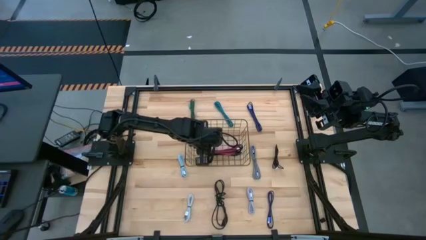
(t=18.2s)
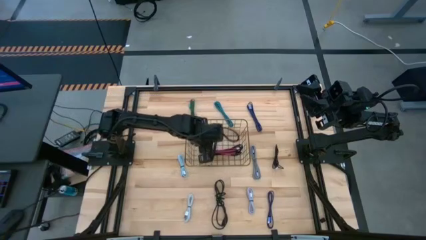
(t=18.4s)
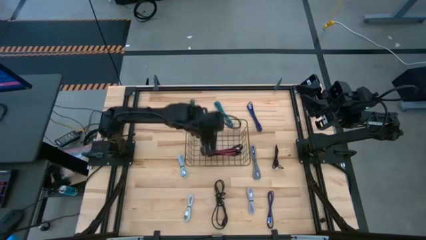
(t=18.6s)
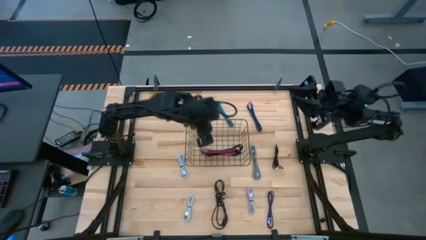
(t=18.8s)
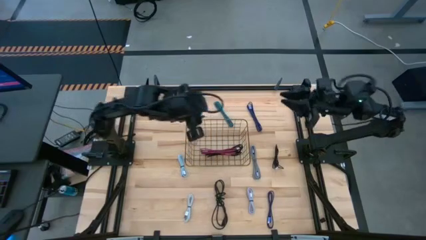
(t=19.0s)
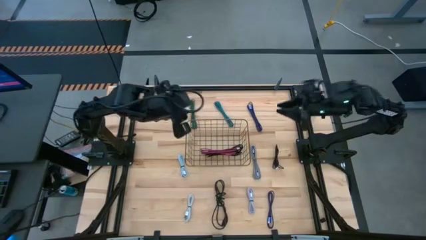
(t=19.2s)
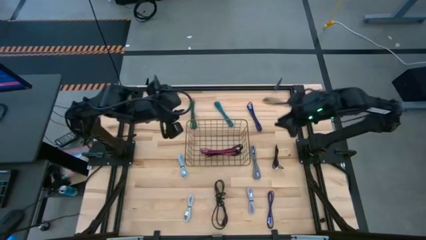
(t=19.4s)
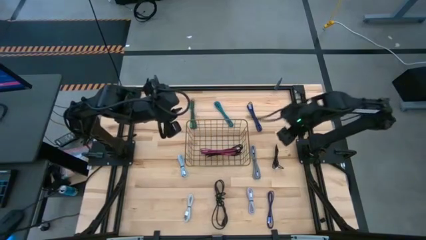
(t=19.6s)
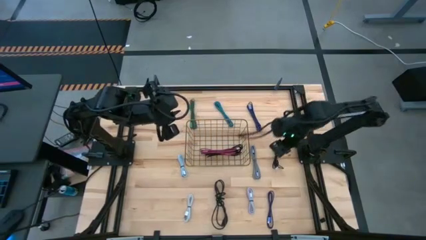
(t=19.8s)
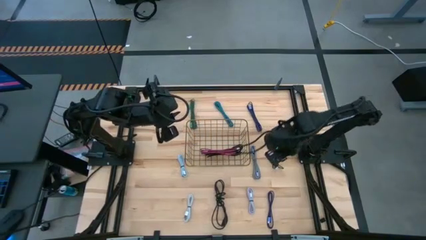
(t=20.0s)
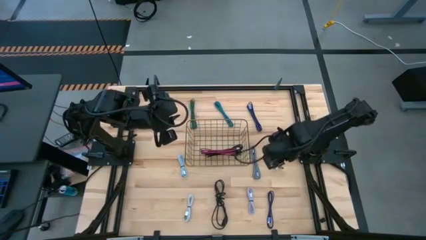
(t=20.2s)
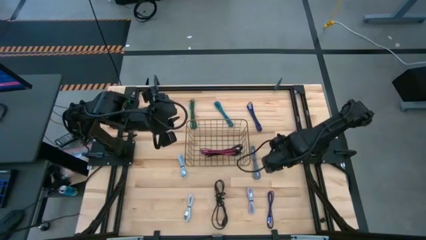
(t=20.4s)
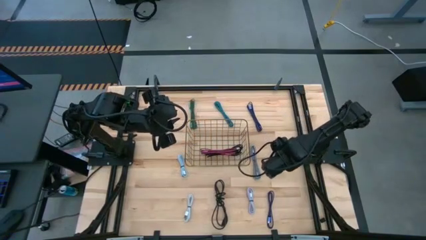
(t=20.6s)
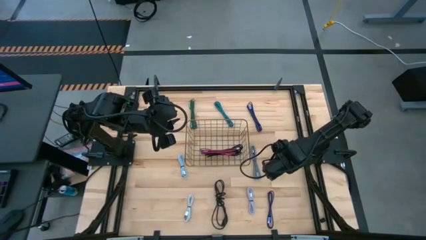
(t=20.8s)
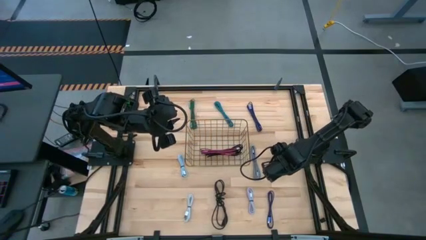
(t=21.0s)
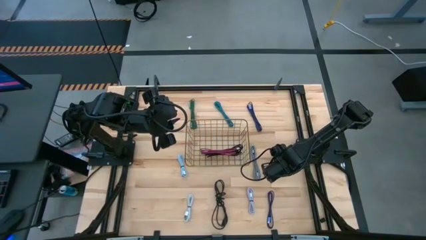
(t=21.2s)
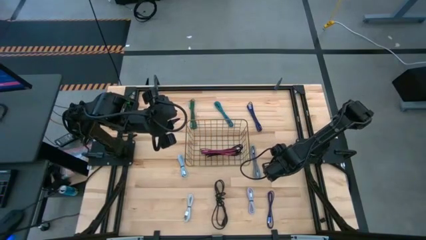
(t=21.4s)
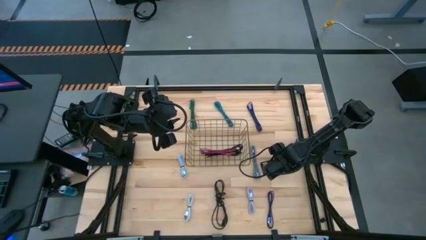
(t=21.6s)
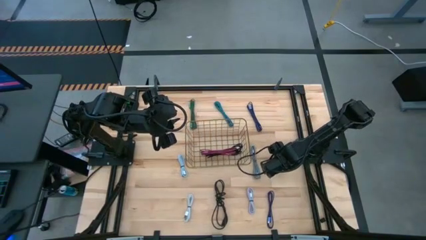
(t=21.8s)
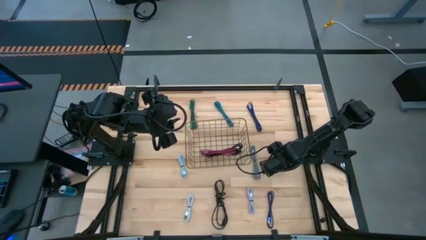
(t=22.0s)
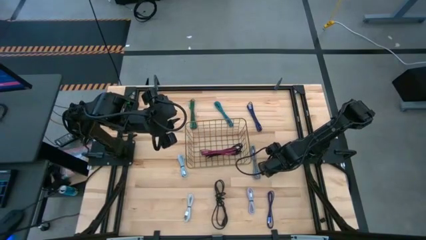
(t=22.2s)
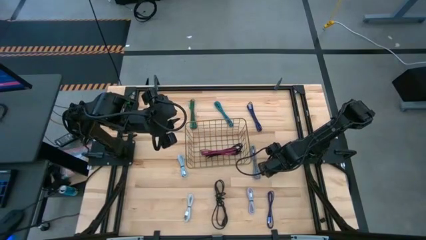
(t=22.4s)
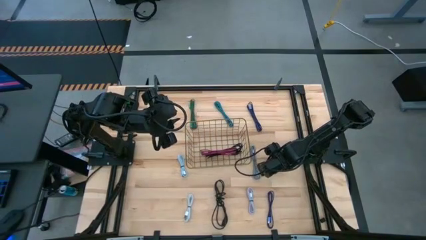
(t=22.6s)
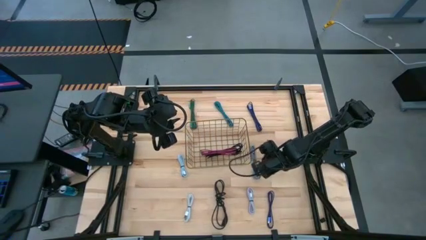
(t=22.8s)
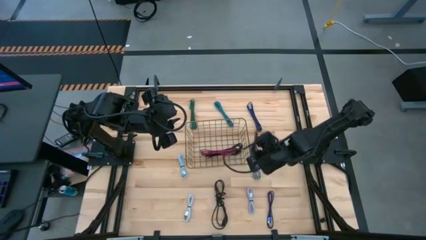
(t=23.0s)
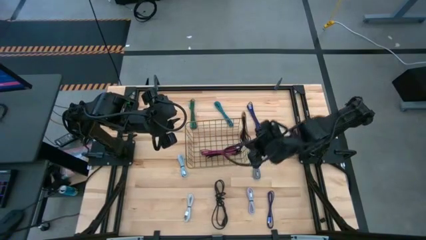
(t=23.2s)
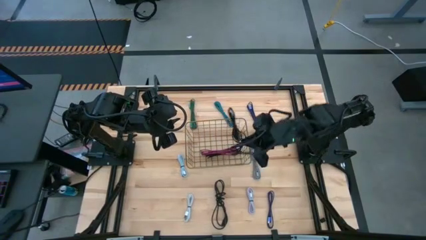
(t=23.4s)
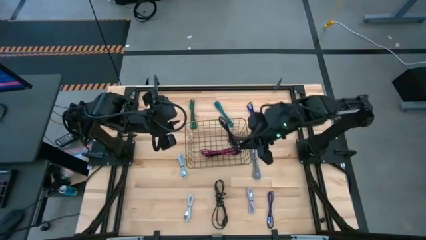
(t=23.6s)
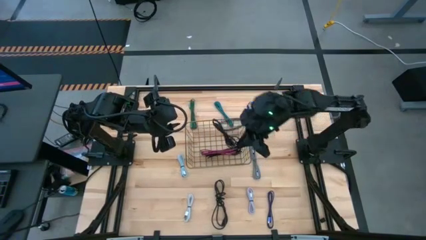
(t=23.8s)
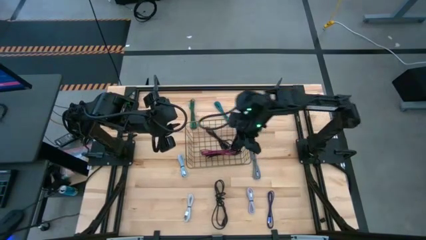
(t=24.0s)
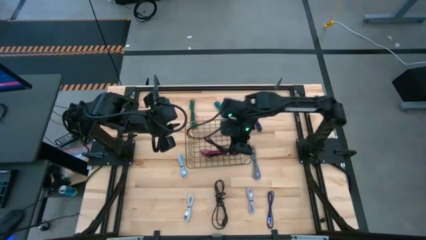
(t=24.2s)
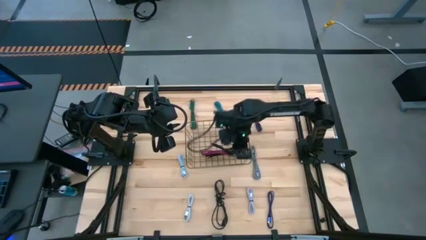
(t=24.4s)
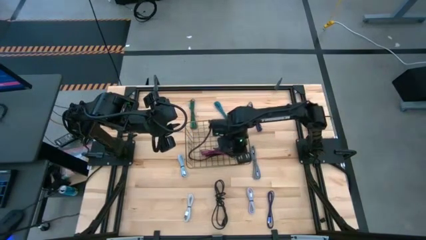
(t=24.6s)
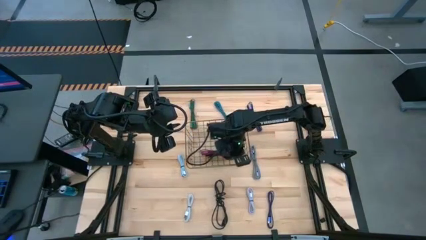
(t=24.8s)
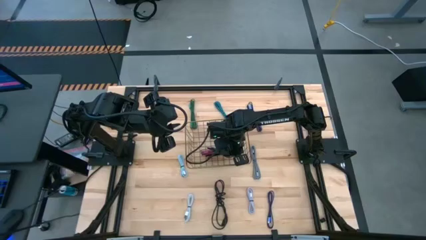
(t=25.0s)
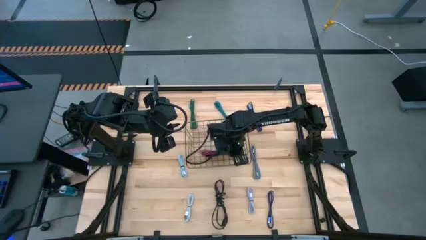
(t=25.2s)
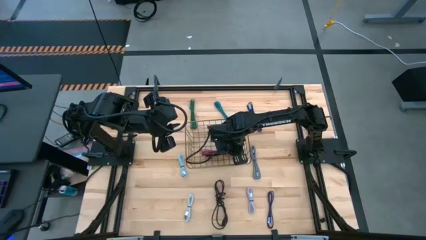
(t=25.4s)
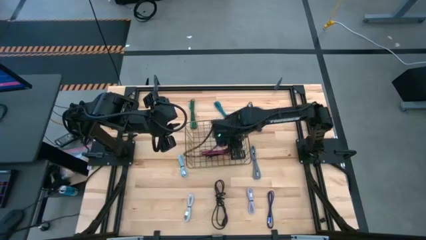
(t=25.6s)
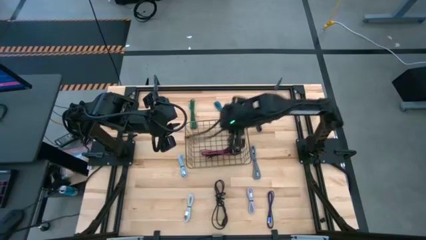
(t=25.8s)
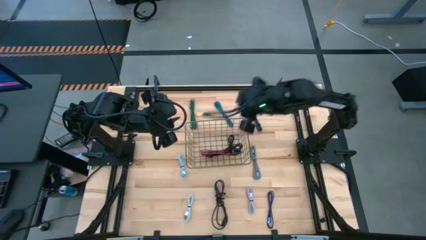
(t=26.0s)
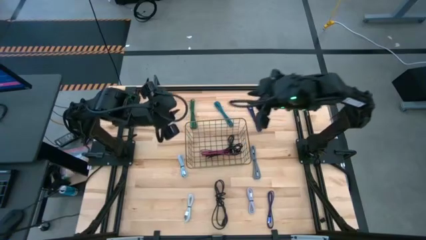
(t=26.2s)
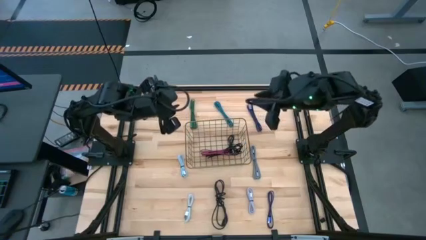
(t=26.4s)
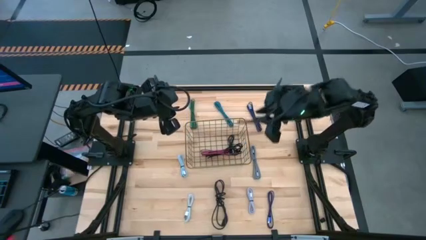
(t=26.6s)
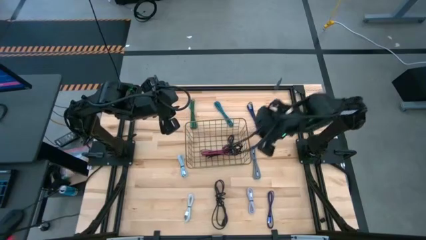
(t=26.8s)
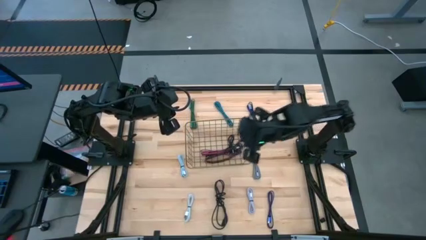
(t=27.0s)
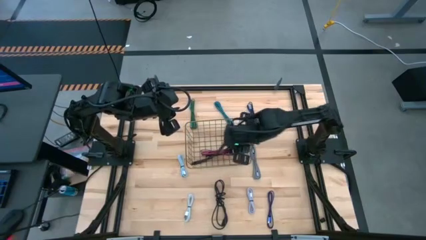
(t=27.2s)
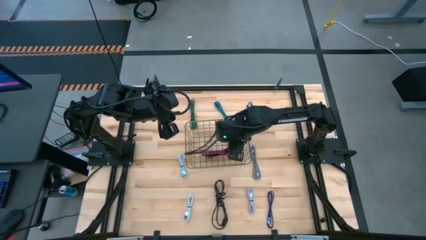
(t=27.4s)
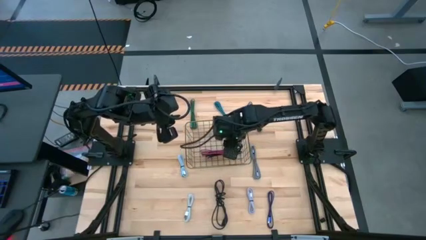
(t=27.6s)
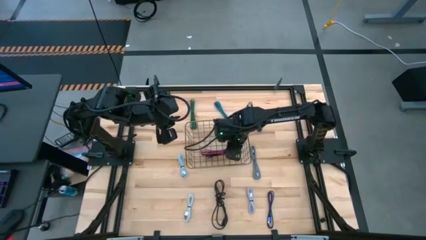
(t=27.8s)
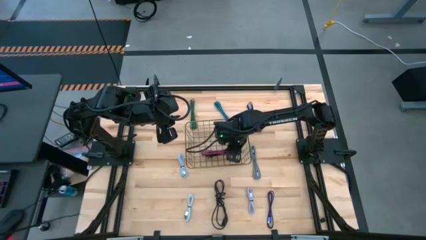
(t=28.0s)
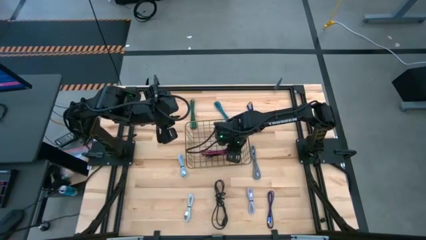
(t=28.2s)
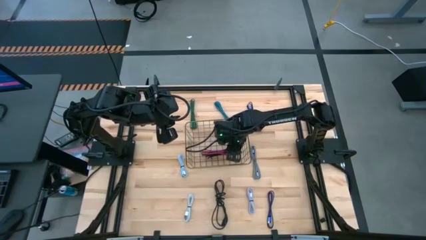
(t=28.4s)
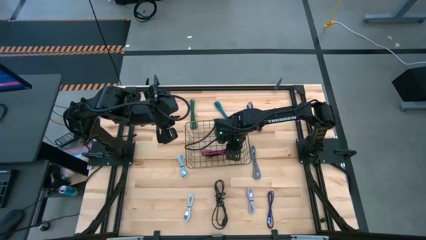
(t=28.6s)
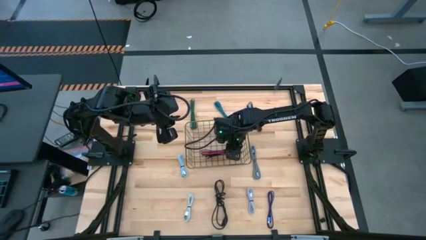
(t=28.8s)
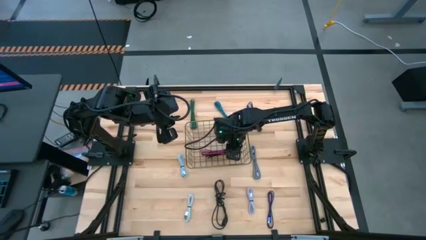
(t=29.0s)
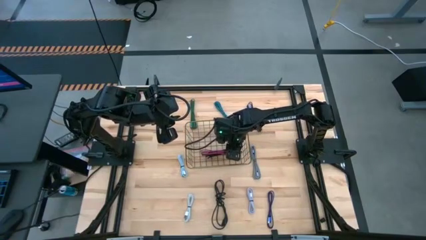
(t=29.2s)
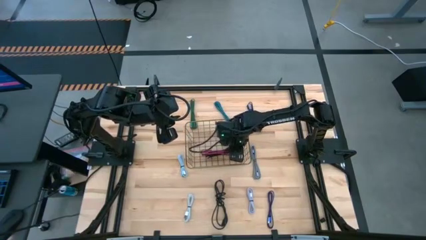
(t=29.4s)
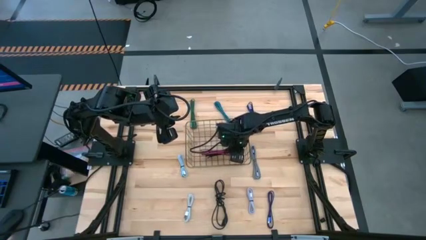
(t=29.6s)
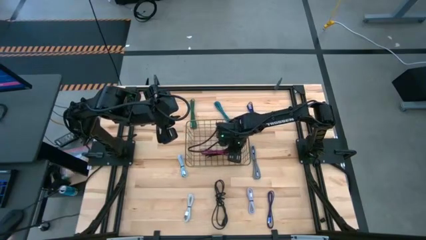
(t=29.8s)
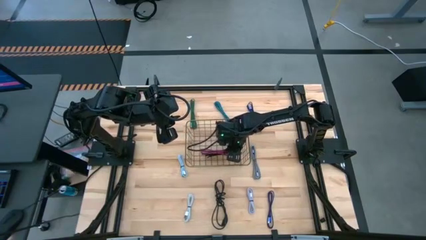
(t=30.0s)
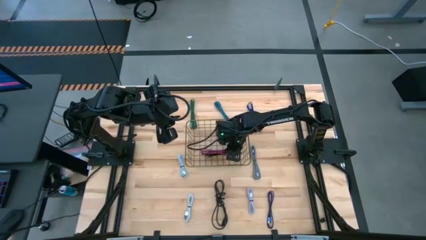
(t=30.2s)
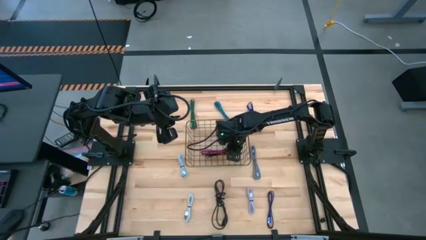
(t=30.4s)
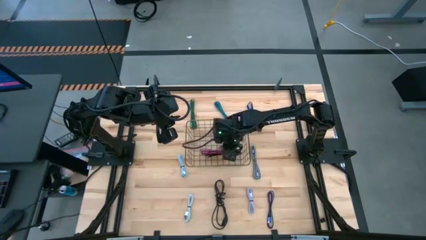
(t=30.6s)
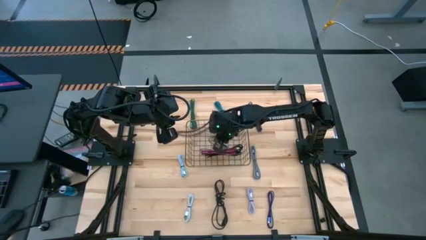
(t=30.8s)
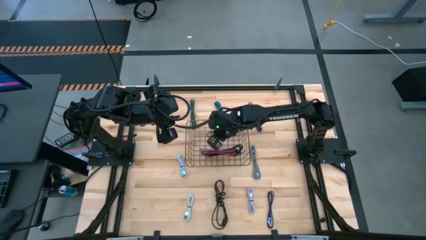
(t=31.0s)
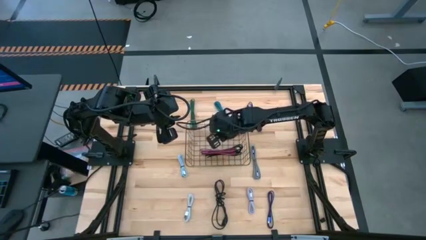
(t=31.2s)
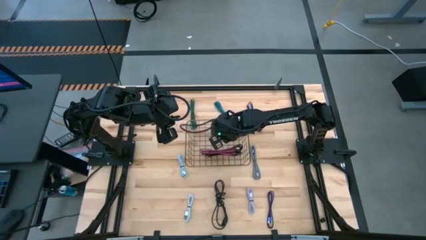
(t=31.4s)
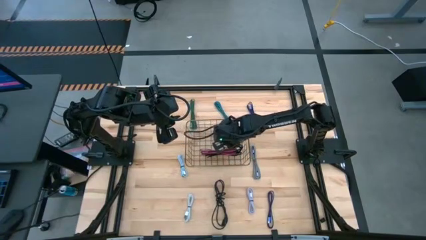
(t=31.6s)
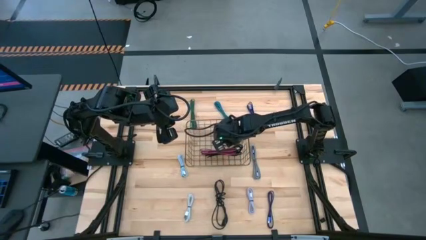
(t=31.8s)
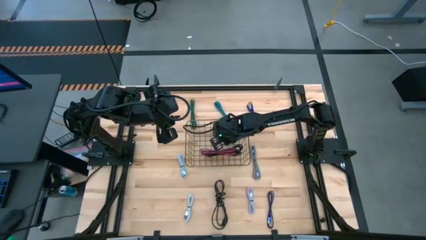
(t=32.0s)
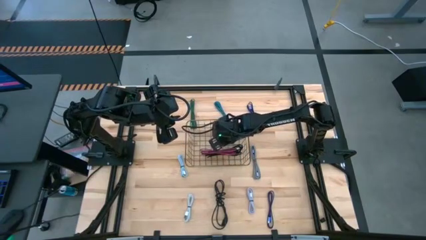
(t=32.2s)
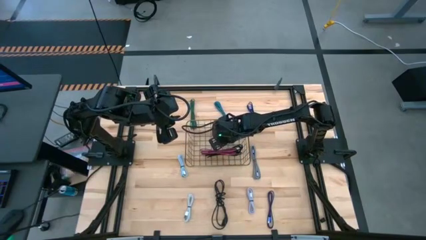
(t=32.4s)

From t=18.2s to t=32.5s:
Task: Pick and place USB-C Cables
Put the top black USB cable into the gold wire basket
